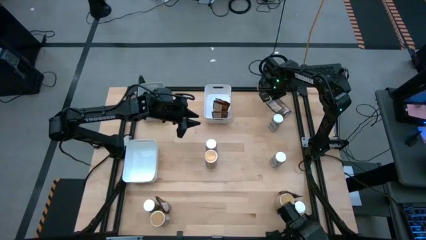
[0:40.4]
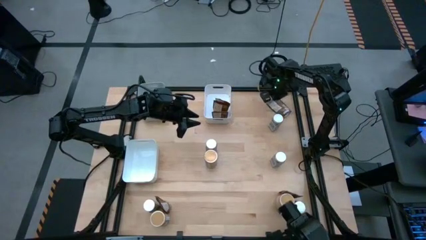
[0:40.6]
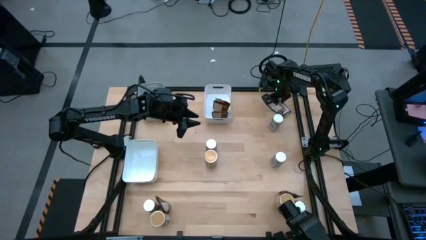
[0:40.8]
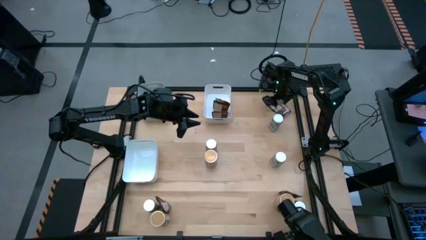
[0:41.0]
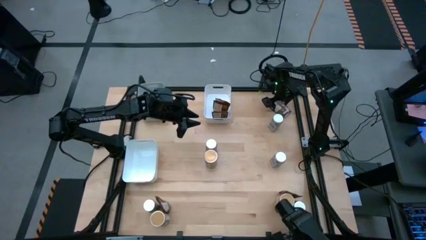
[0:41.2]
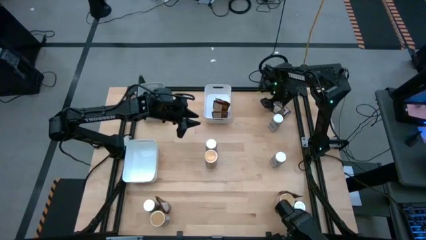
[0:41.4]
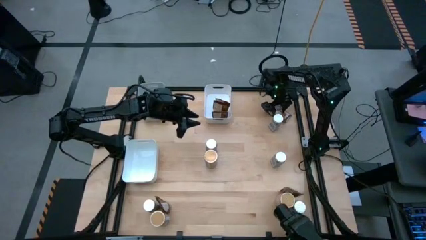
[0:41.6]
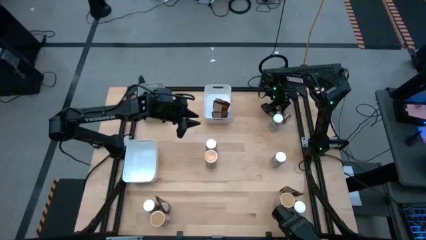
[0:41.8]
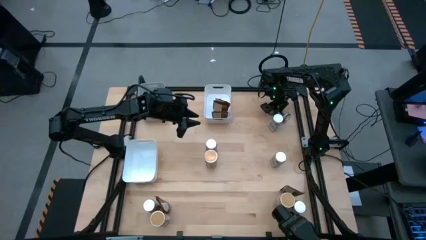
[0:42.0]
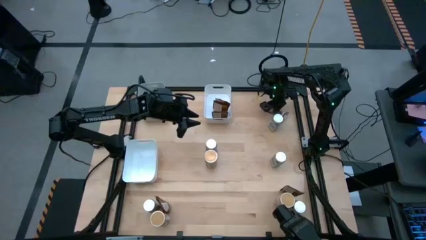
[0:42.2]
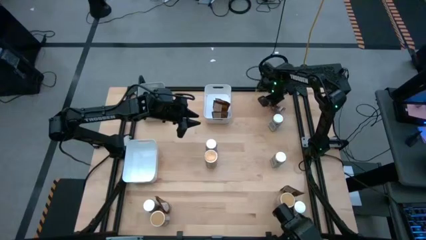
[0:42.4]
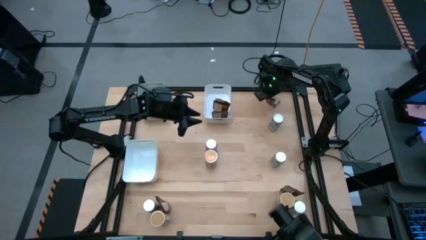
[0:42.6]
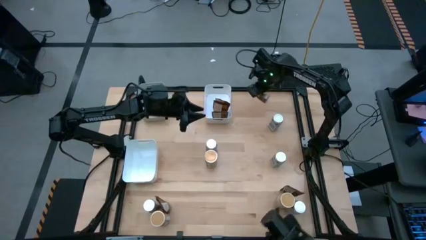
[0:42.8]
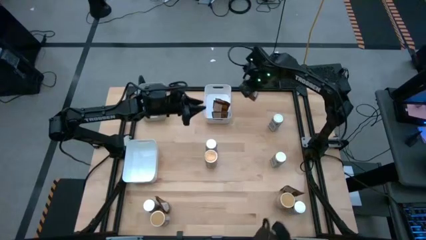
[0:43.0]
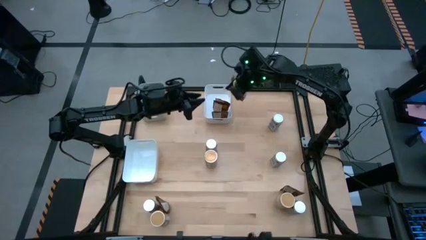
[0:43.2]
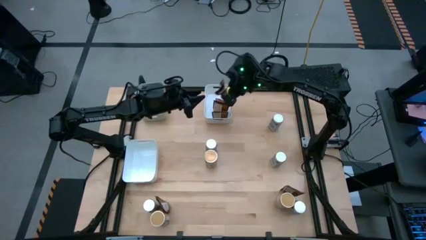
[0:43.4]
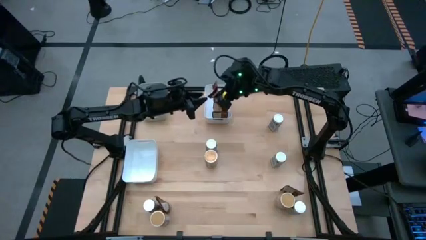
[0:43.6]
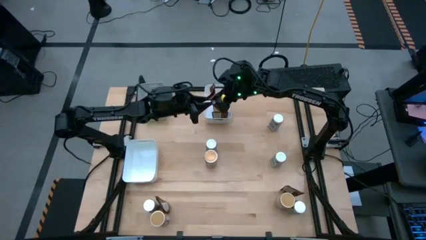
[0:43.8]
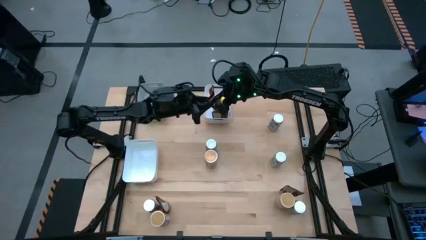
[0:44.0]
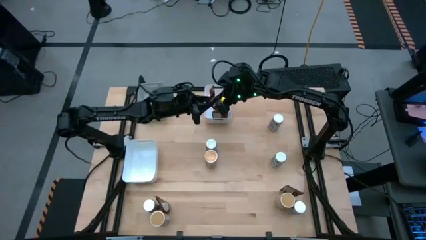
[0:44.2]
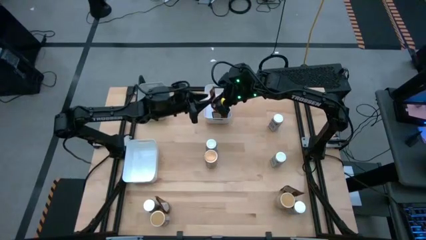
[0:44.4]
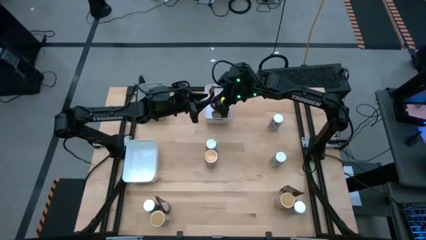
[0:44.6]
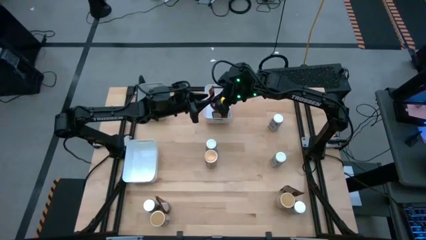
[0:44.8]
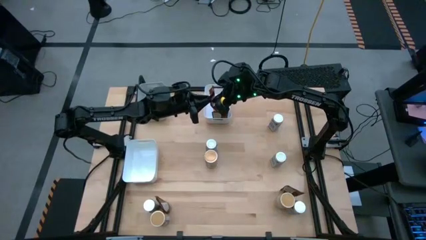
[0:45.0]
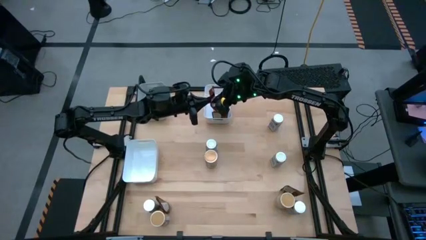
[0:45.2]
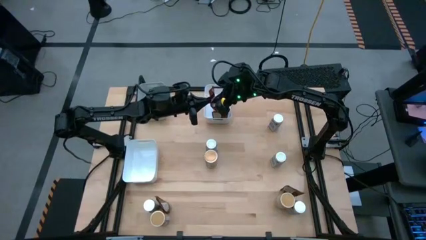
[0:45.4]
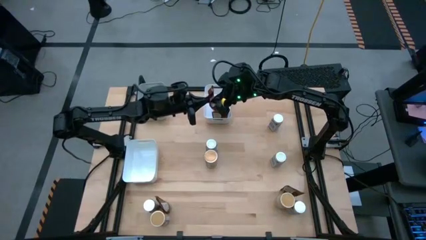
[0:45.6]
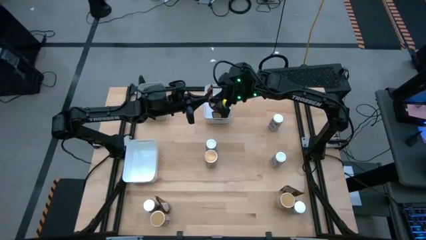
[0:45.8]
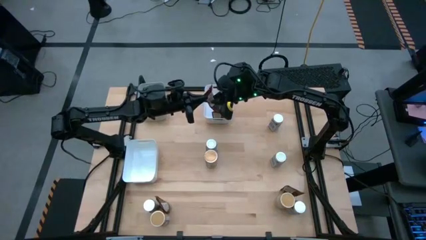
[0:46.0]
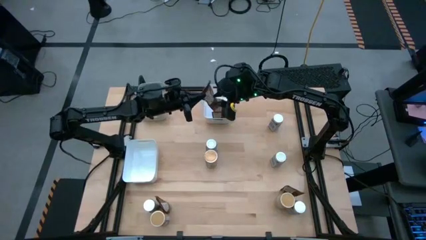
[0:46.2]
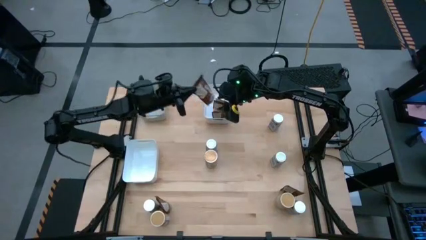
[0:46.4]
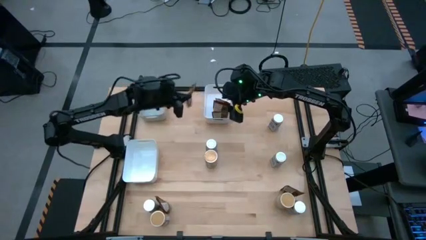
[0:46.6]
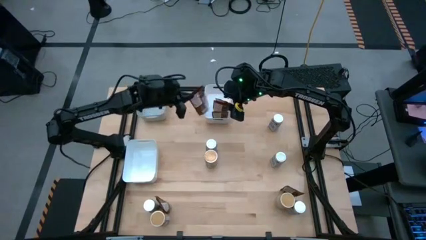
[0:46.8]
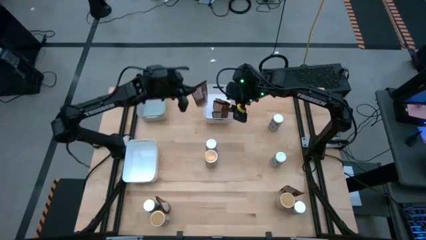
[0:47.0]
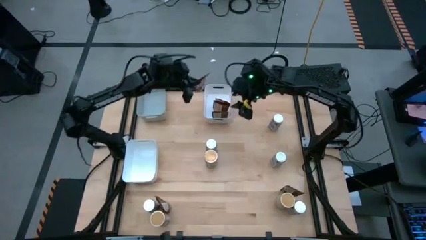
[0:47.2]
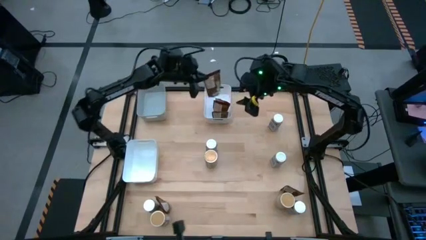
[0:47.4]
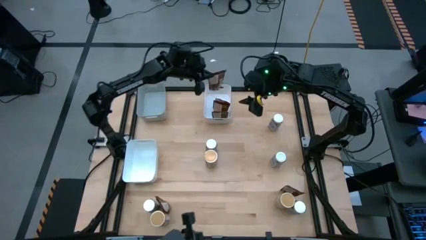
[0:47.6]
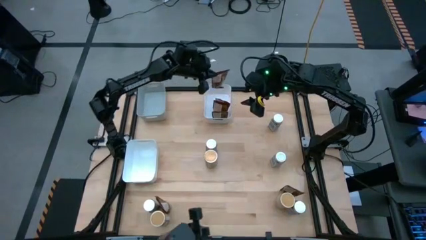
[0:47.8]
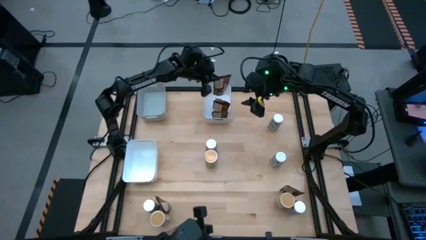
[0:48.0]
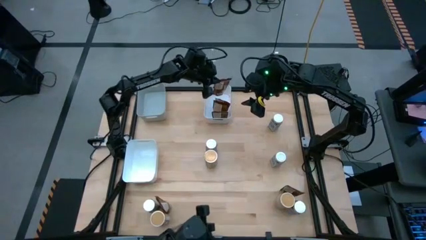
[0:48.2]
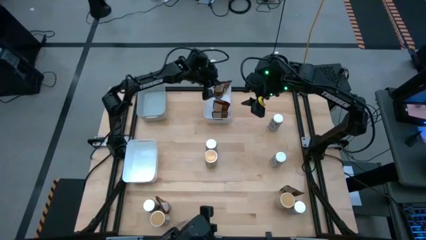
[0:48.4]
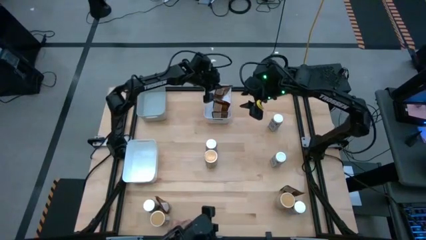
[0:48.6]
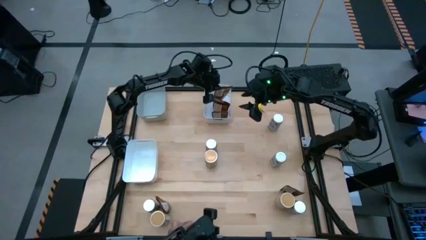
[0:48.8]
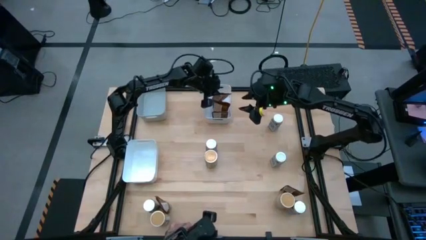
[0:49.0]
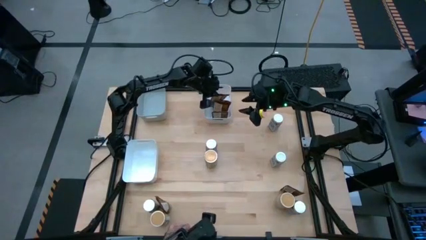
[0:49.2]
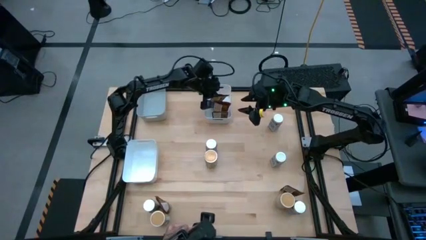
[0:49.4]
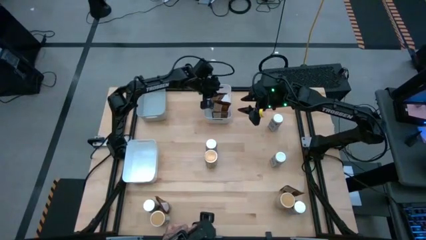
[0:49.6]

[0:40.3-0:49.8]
Task: Sort spices by type
Put the brown seasoning pack into the top white bin

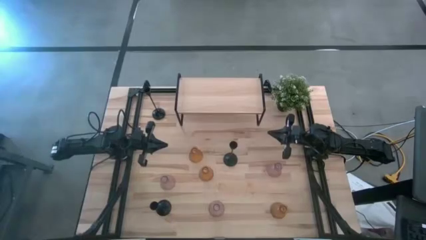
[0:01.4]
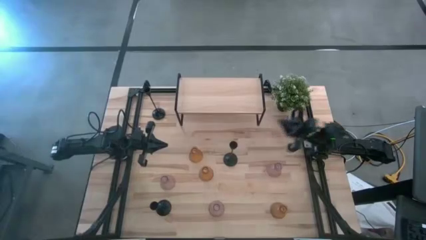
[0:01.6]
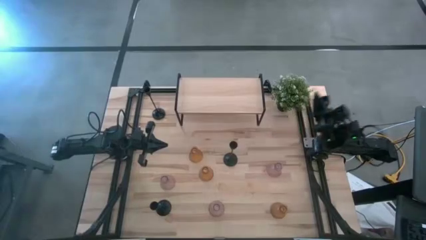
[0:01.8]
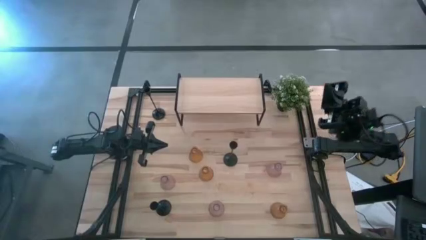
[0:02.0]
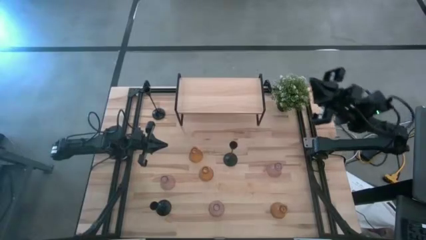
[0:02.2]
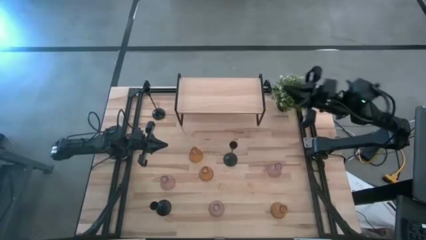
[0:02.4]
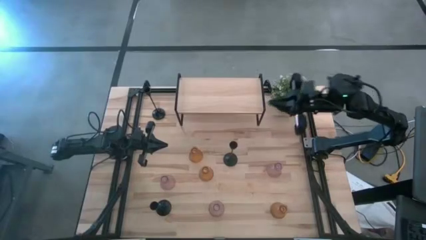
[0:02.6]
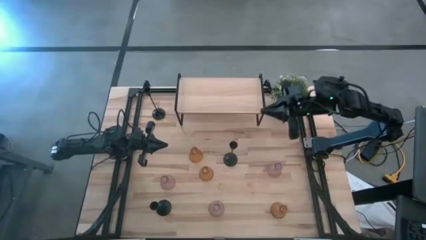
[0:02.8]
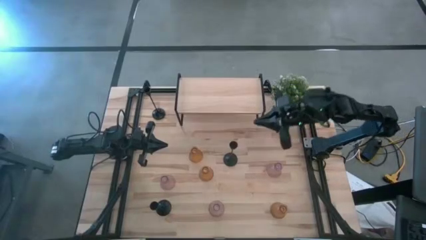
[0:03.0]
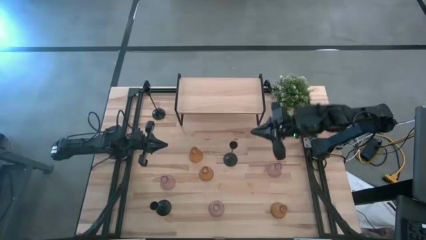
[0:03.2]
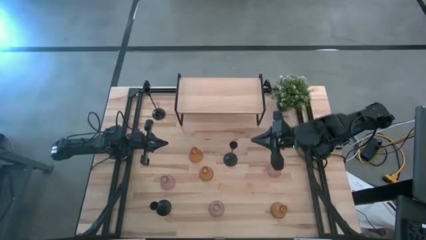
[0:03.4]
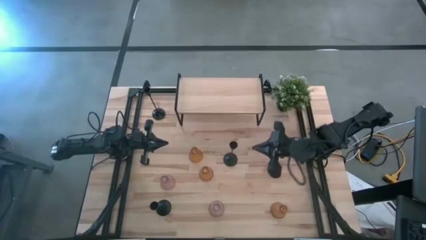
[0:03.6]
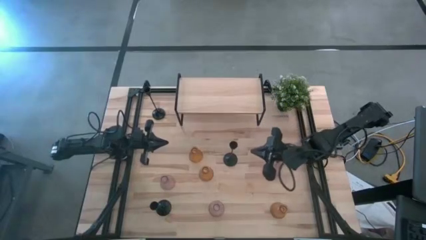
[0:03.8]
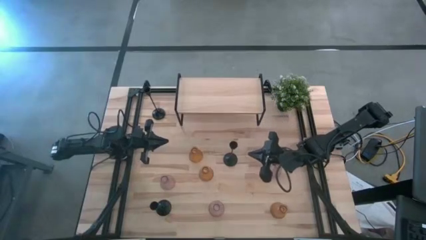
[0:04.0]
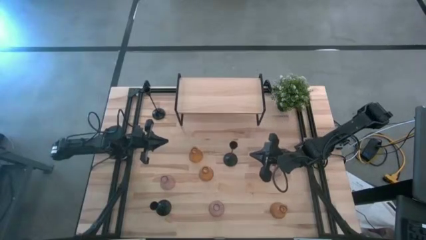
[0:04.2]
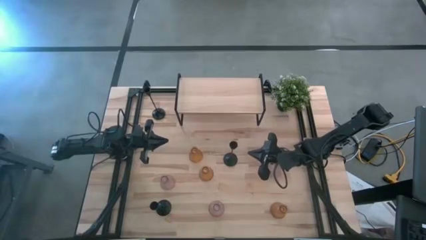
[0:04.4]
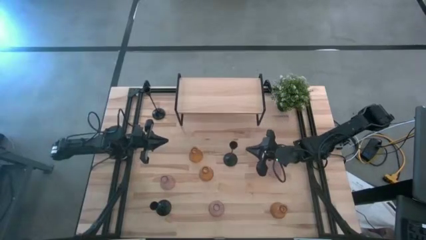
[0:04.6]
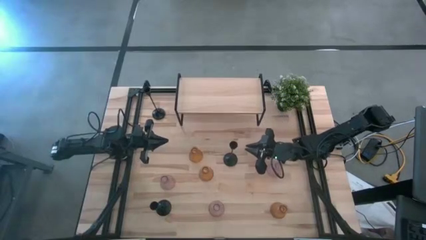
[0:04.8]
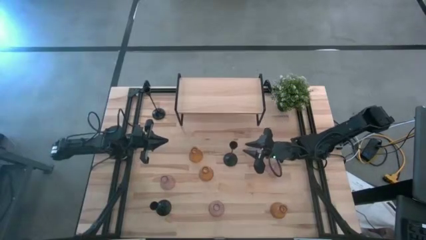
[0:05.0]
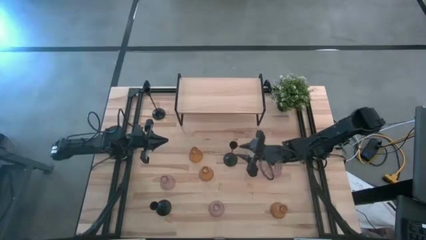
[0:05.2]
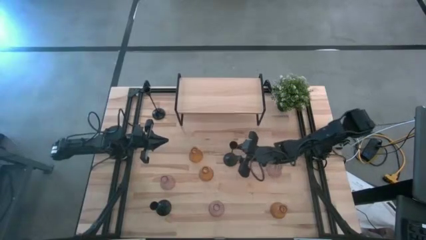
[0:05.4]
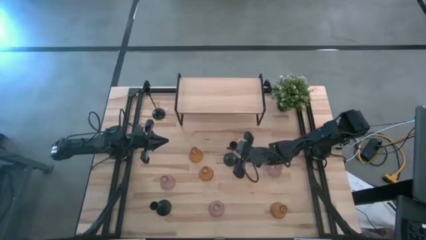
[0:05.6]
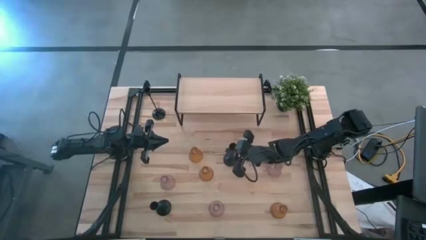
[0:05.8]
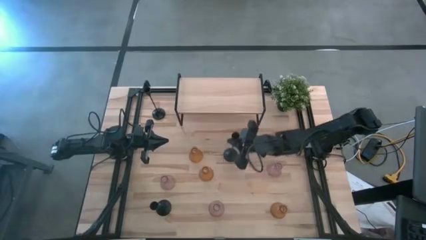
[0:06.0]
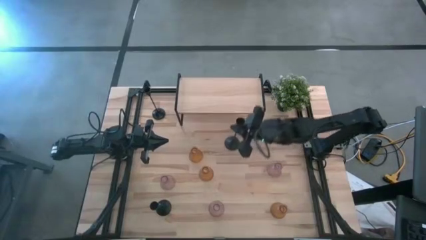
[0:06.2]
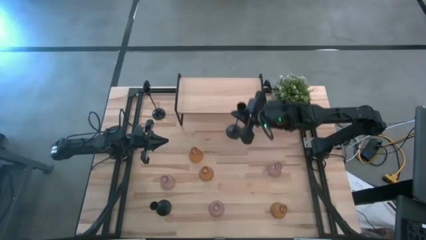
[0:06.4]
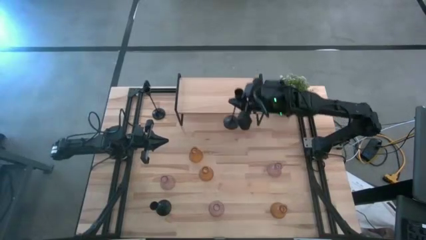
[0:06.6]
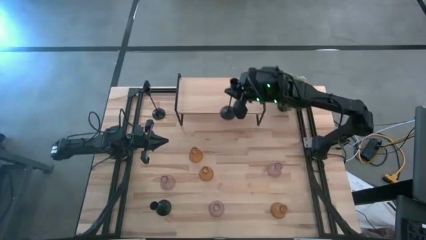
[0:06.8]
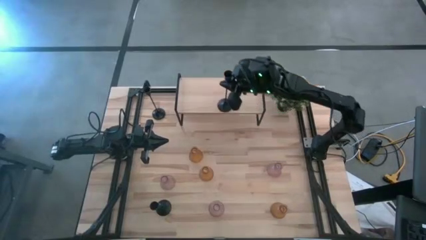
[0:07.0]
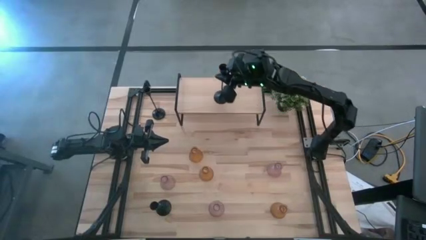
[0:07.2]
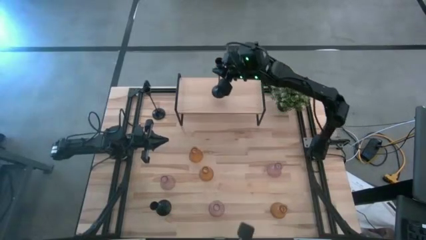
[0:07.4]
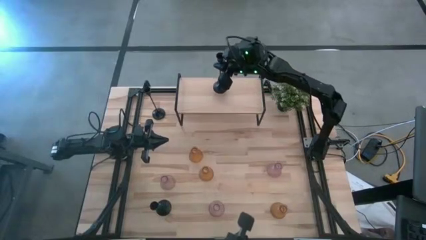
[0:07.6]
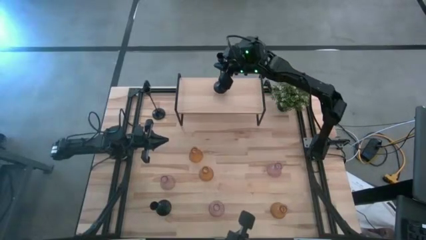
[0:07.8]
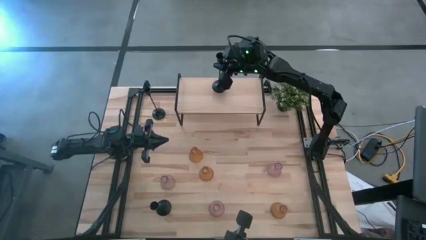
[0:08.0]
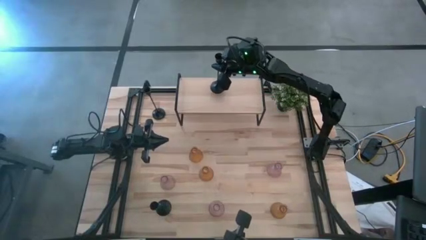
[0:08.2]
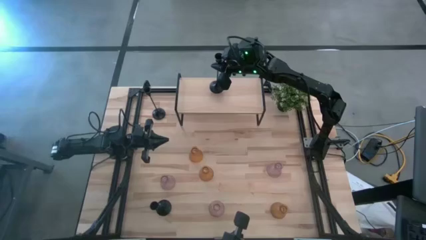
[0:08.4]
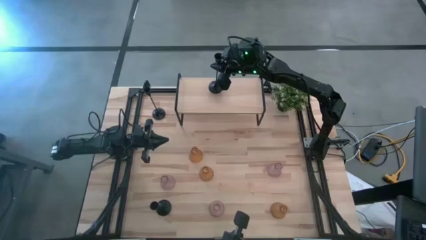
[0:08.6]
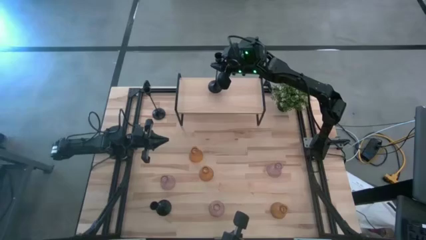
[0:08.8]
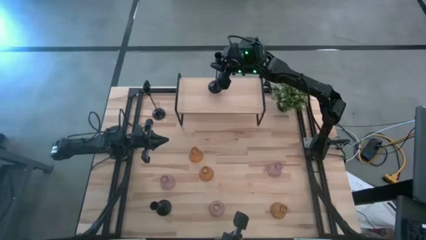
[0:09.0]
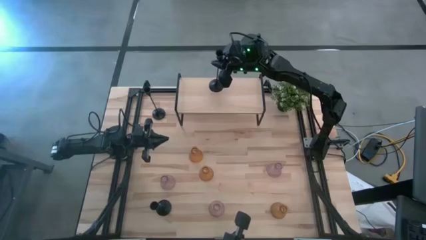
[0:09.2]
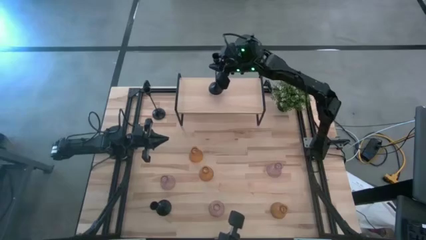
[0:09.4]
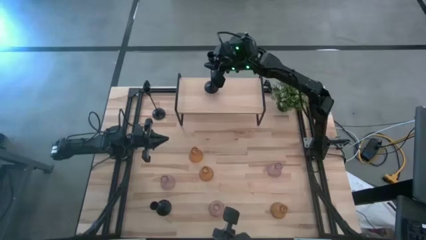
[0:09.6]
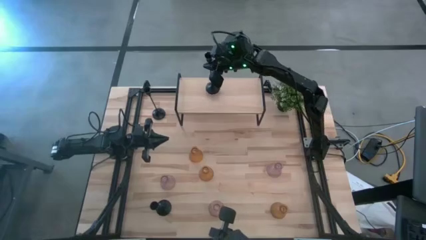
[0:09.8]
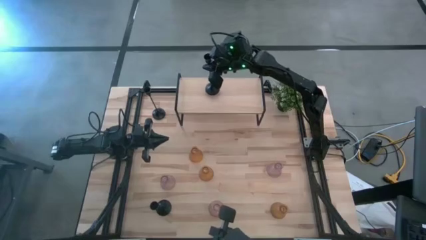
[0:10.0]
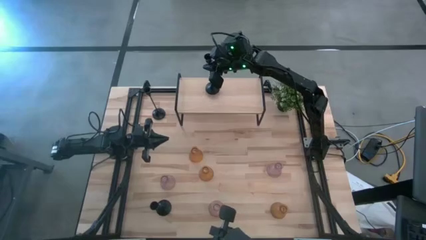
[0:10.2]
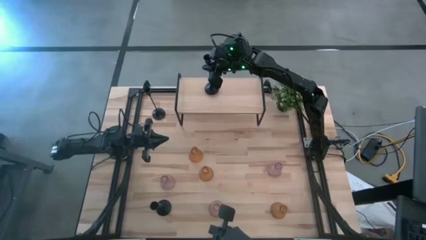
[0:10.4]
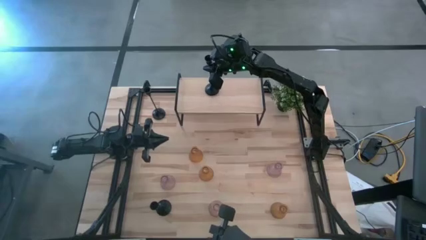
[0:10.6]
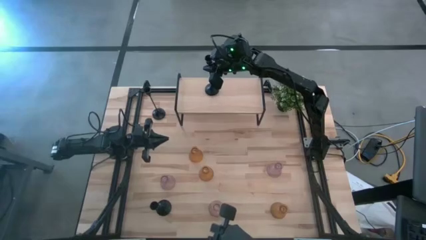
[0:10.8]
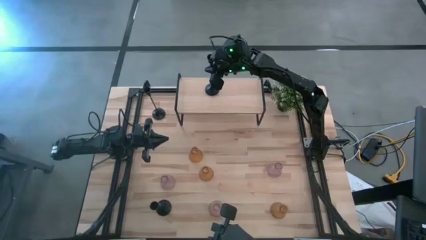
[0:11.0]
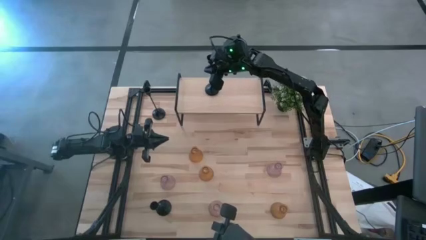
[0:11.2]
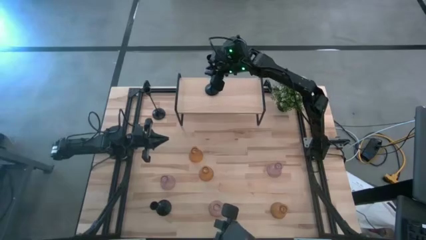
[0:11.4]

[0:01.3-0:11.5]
Task: Pick & Place candle stick holders
Put the middle right black candle holder on the shelf
